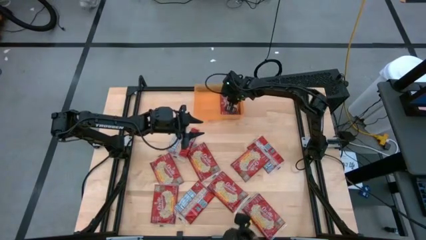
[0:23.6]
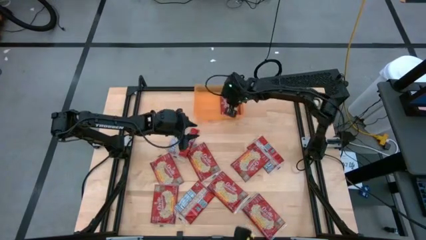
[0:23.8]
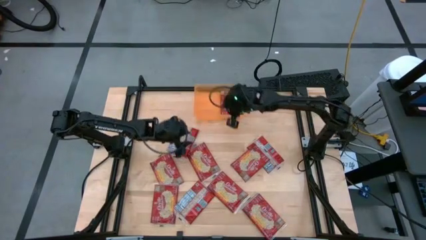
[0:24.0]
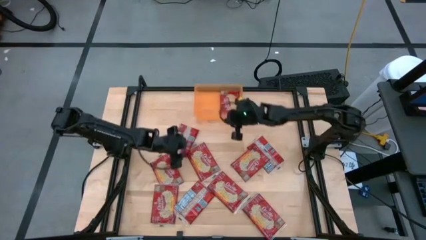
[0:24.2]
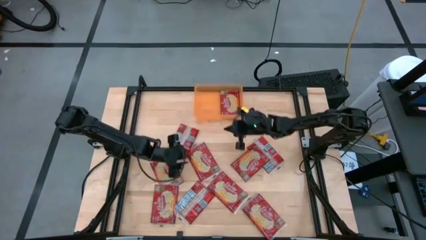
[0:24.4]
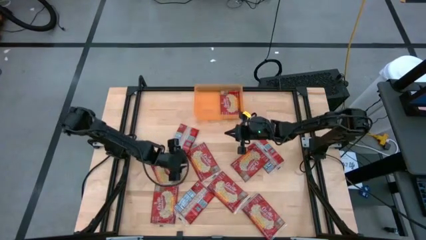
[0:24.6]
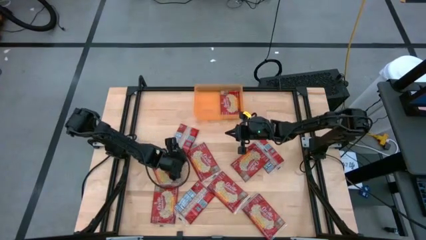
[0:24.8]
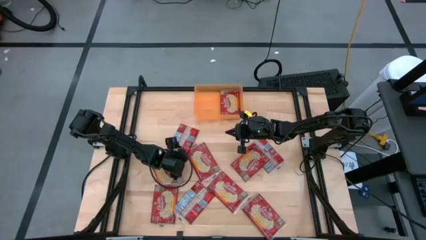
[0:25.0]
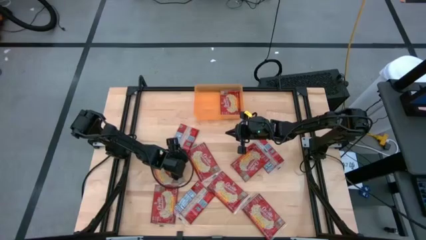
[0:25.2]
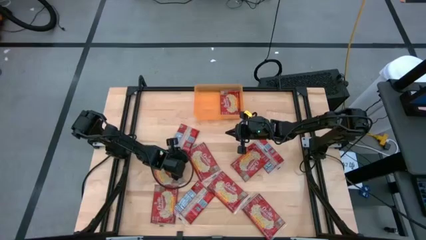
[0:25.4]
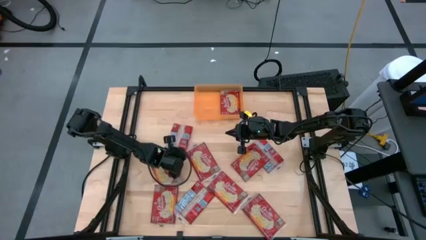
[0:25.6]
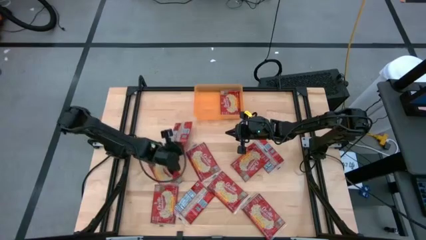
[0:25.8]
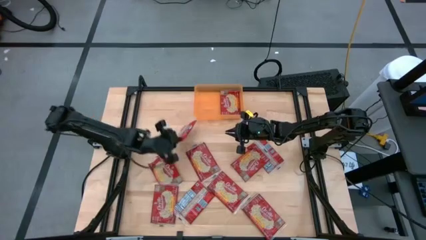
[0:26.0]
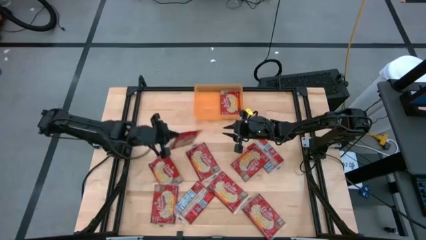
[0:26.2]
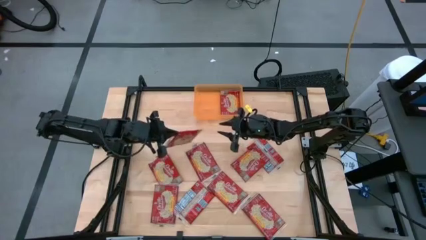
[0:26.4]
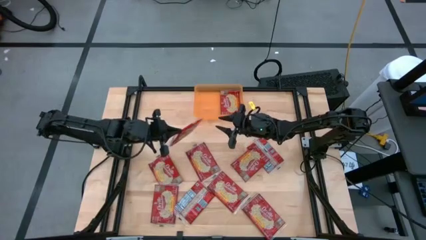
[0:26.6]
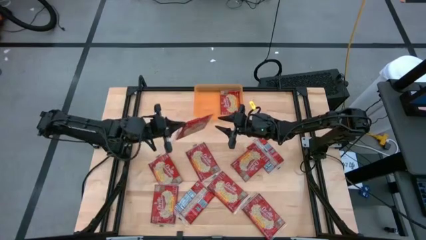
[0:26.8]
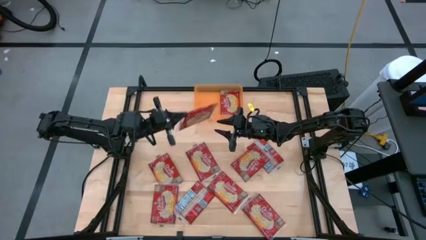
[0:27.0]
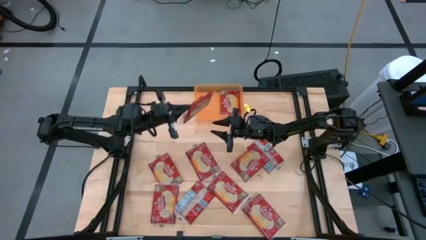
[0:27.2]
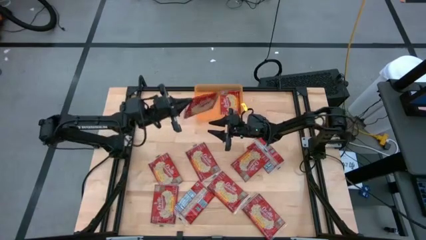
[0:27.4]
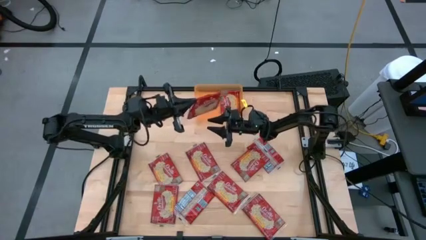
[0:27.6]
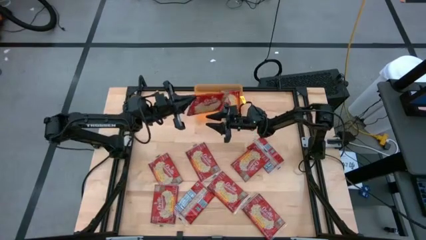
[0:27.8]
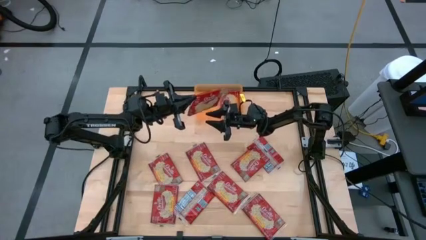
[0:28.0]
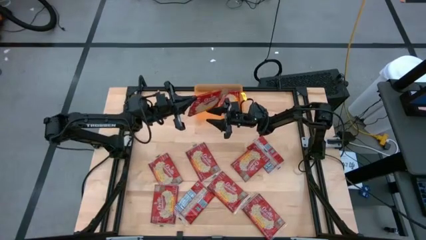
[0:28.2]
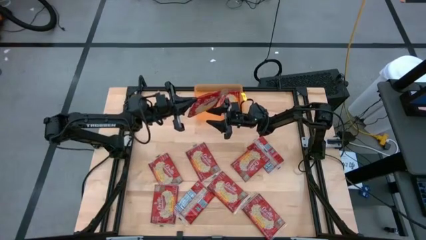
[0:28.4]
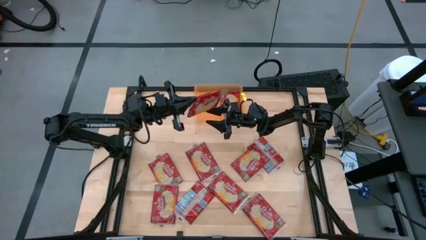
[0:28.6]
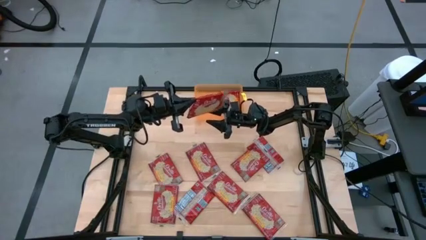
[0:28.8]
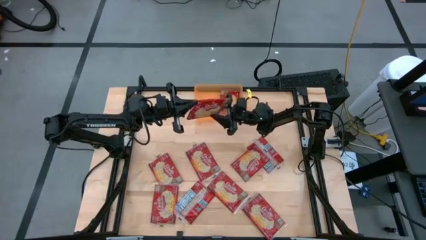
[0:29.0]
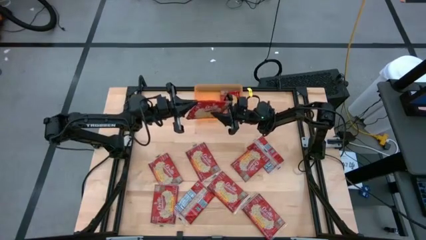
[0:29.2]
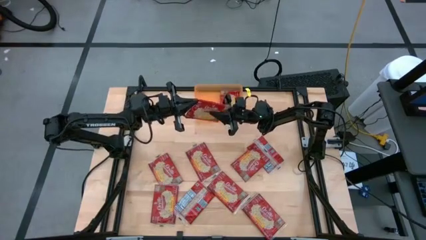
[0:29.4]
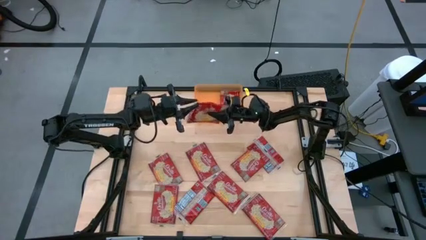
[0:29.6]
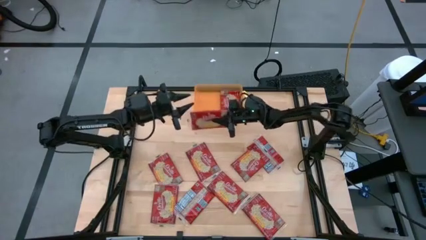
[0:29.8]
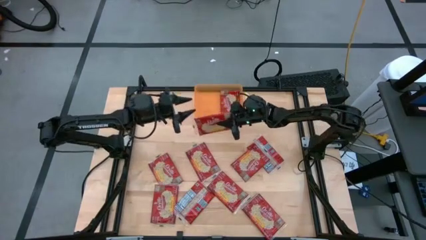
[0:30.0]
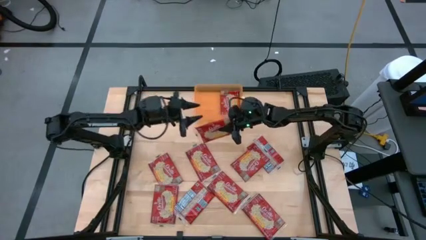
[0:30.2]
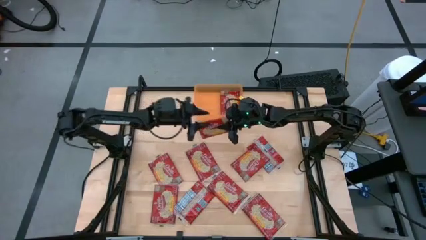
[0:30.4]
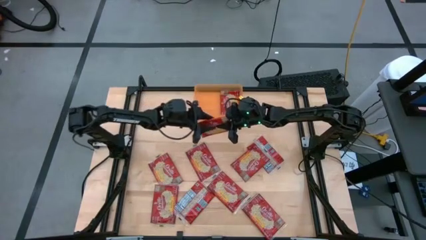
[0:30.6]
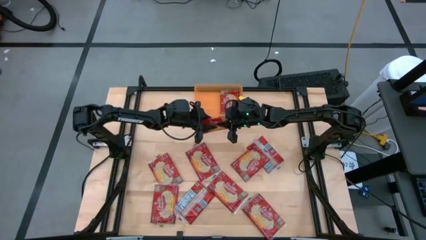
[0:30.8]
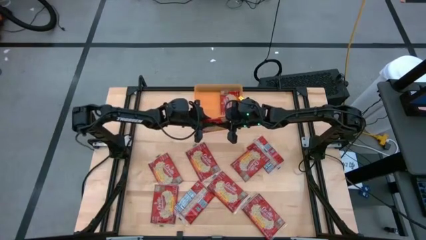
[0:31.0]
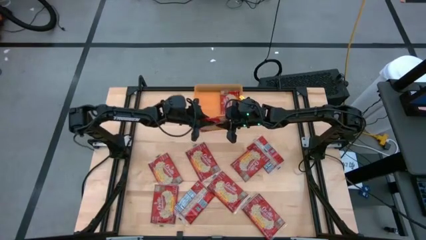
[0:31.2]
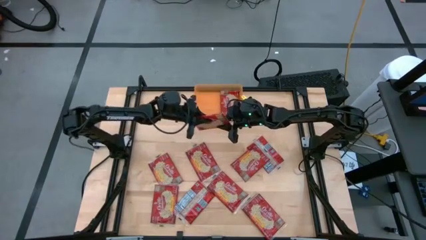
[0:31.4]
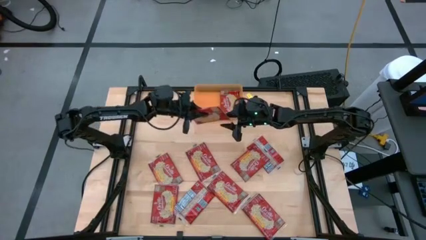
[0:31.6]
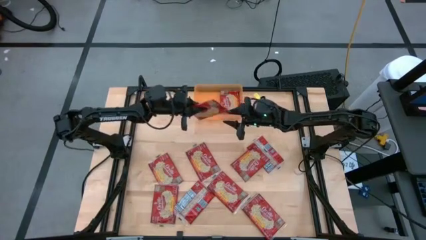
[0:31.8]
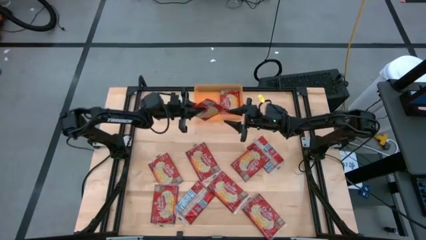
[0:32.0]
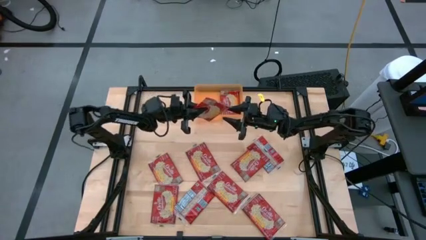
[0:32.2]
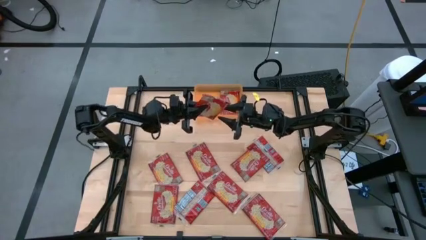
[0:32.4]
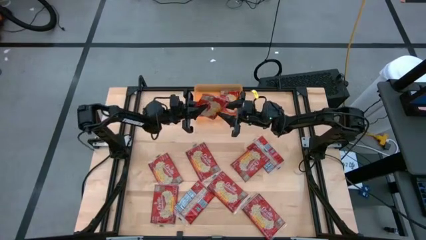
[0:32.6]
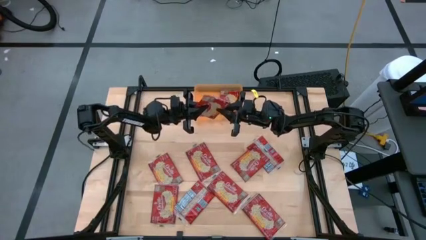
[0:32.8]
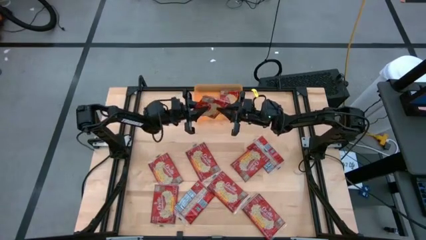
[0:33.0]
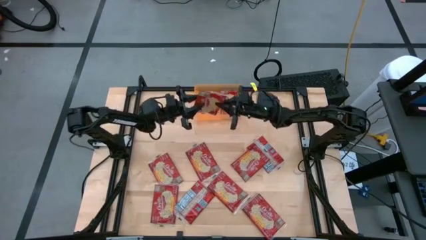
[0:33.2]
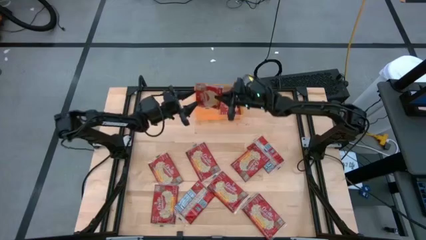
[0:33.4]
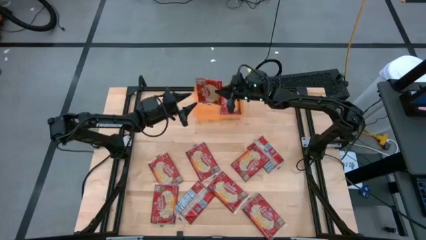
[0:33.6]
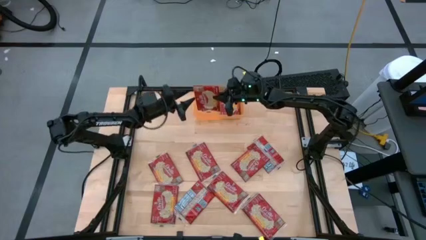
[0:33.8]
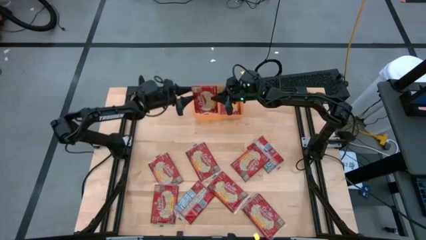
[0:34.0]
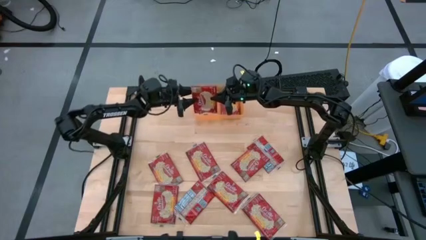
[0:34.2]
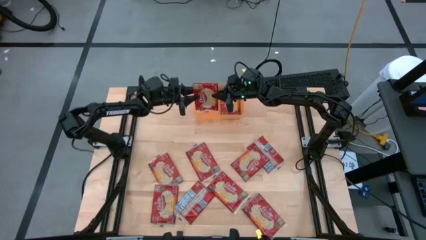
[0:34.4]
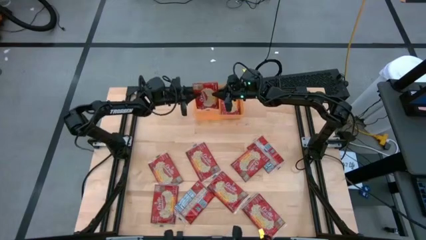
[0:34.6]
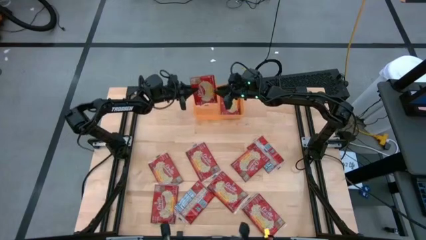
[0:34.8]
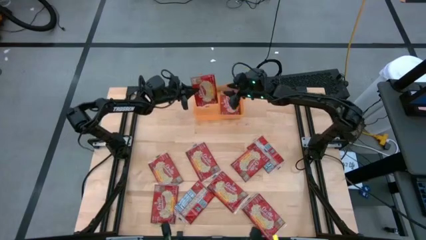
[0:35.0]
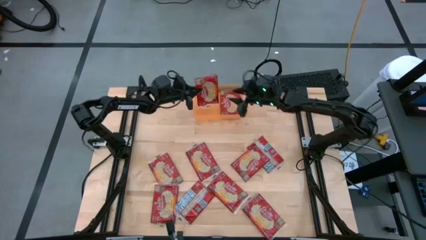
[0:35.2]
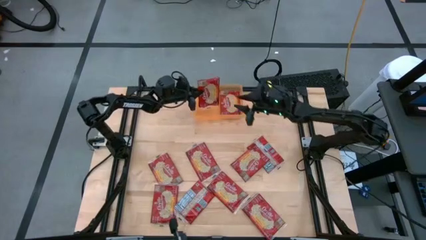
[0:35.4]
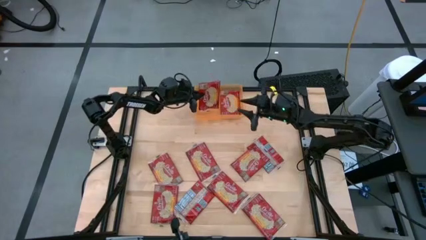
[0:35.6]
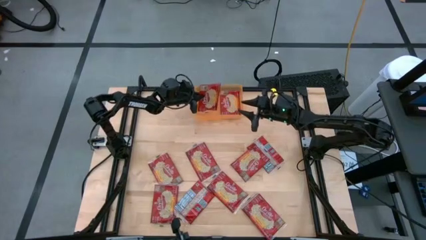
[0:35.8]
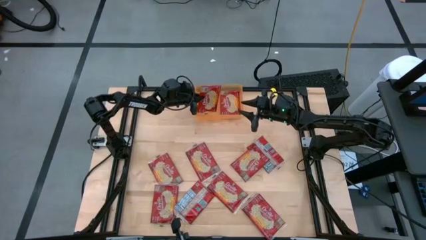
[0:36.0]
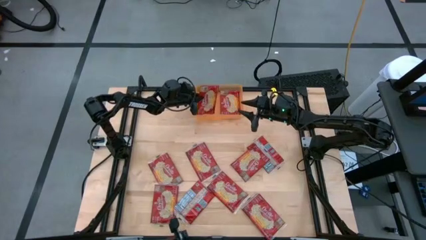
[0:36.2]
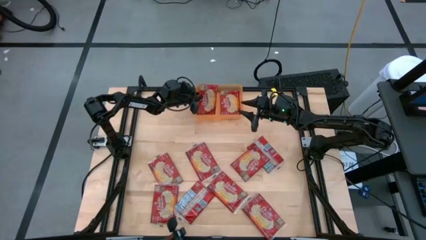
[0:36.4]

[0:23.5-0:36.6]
Task: Sort popcorn bags into baskets
Put the popcorn pack into the orange bin

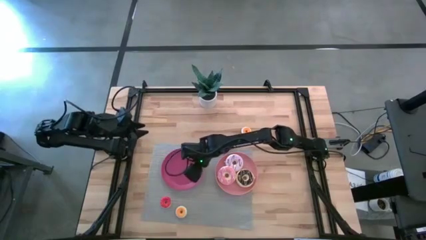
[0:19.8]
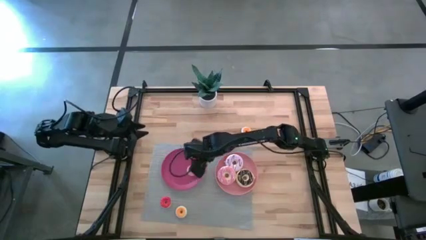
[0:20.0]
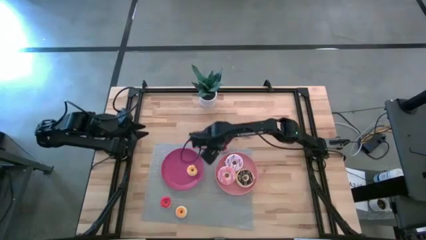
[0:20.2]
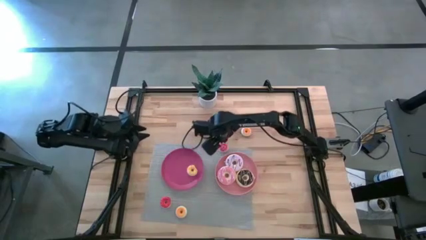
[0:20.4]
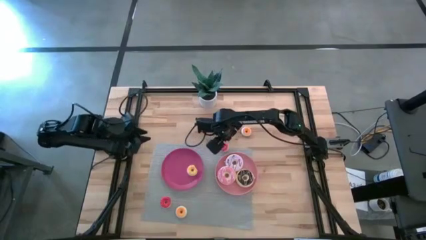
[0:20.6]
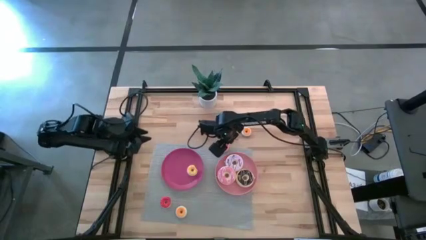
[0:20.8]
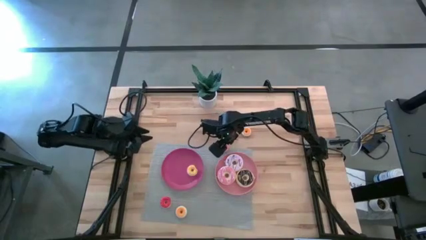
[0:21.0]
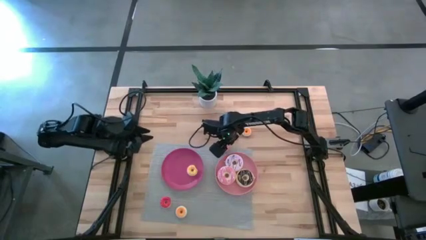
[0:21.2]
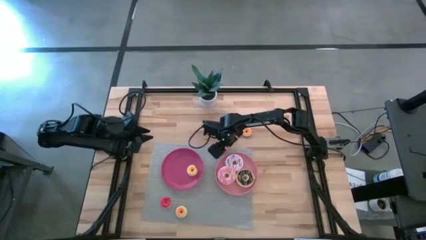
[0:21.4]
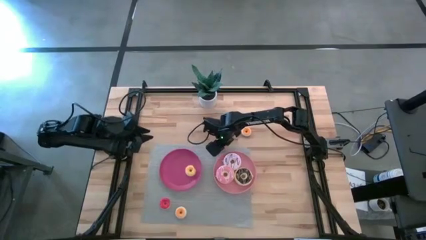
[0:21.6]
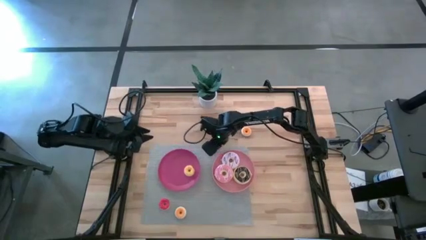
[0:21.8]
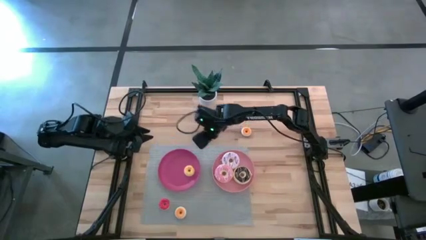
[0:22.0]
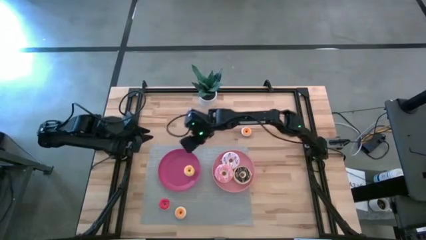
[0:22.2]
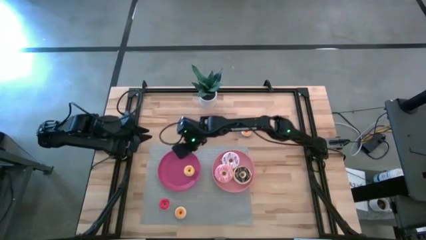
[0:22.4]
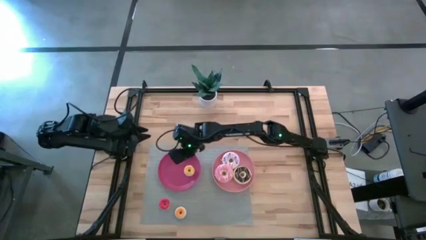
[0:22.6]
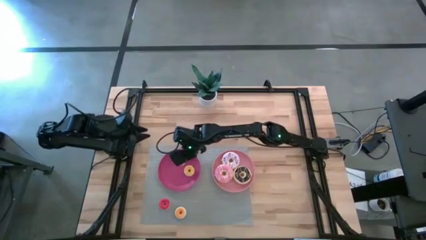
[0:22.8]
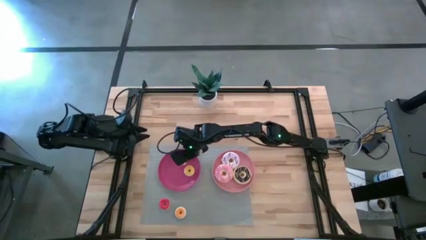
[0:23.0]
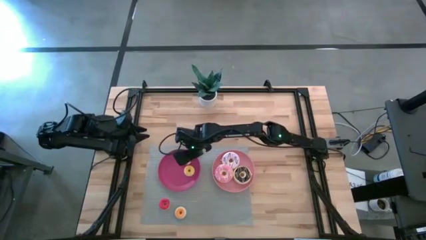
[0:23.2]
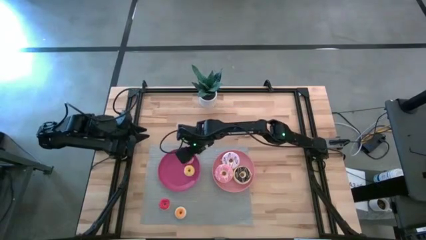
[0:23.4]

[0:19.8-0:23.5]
Task: Pick & Place donuts
Put the small orange donut on the dark pink plate
